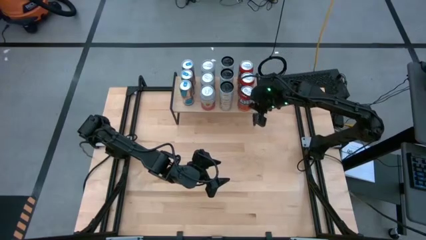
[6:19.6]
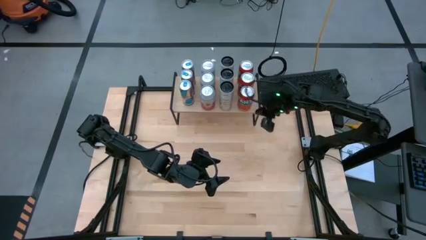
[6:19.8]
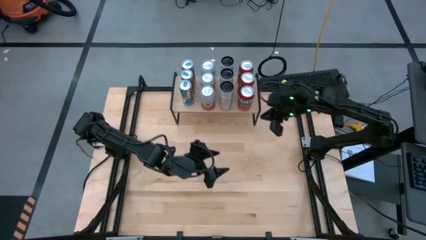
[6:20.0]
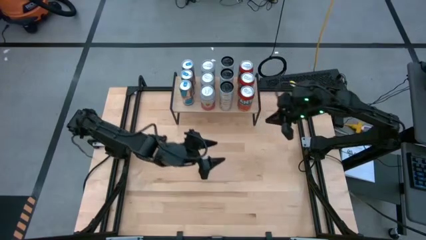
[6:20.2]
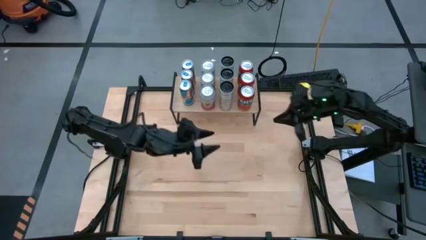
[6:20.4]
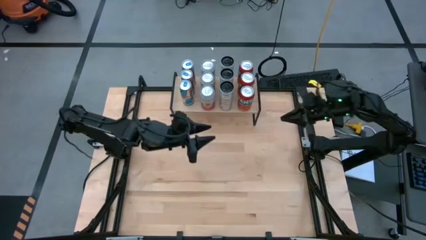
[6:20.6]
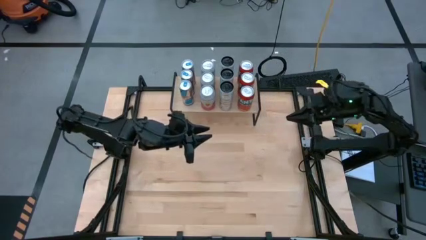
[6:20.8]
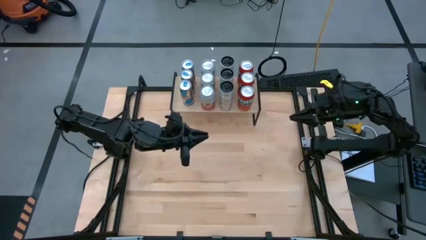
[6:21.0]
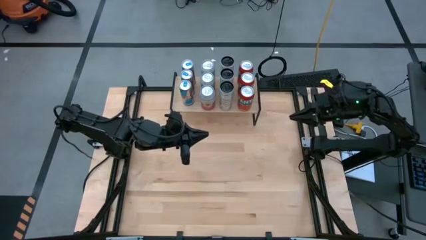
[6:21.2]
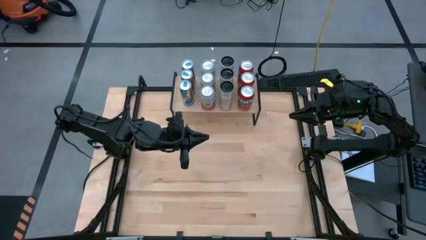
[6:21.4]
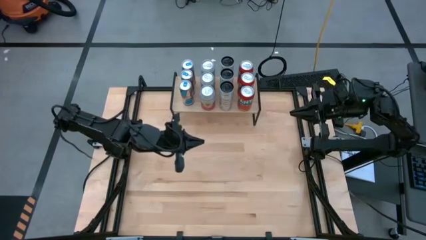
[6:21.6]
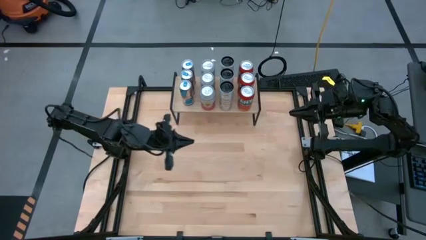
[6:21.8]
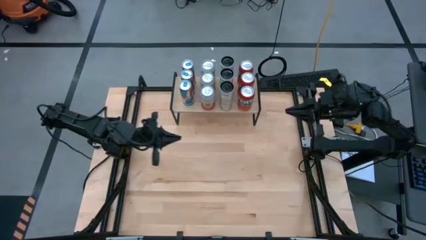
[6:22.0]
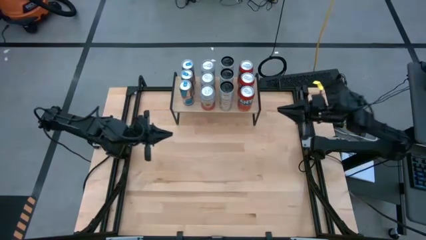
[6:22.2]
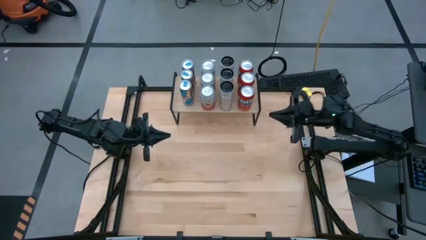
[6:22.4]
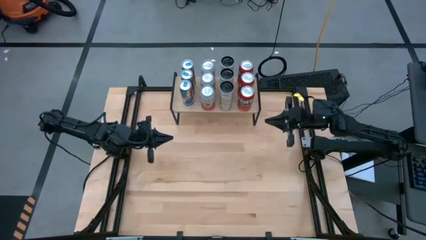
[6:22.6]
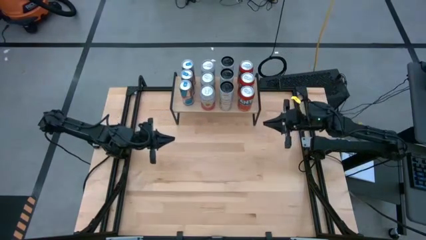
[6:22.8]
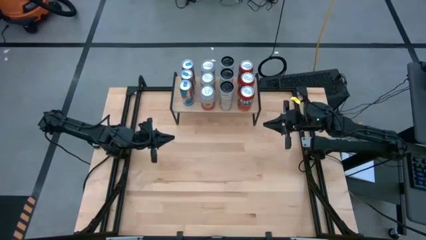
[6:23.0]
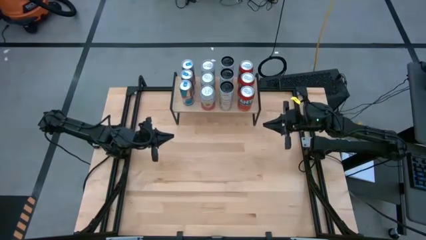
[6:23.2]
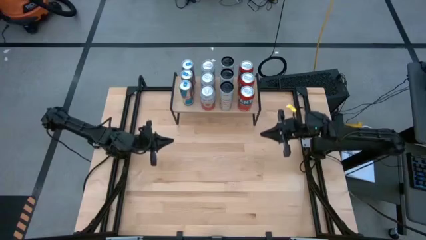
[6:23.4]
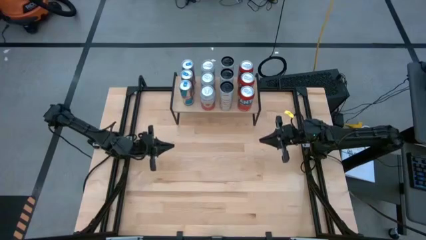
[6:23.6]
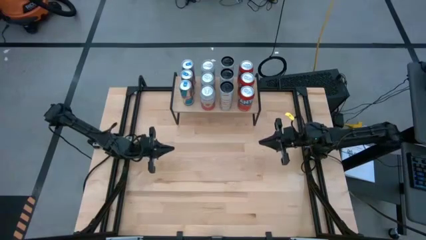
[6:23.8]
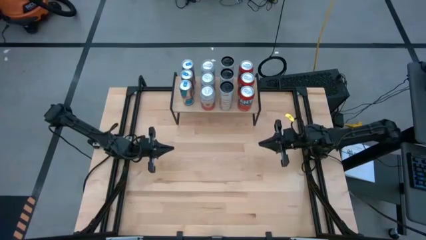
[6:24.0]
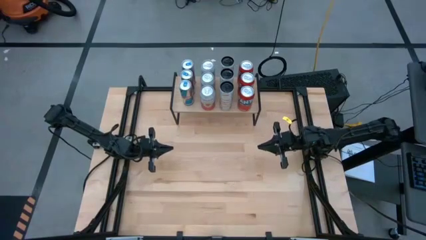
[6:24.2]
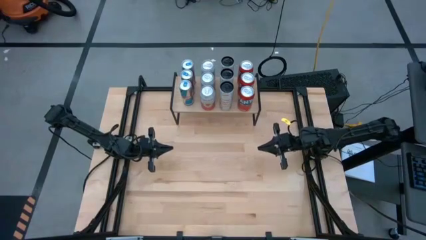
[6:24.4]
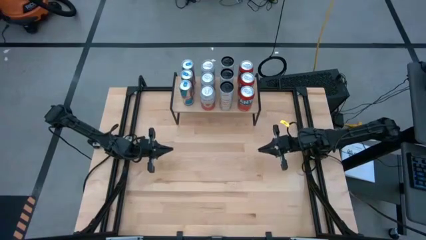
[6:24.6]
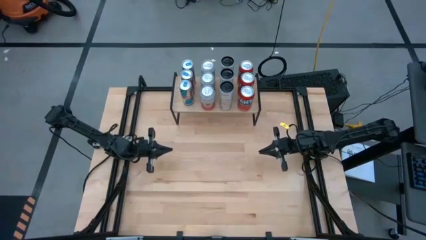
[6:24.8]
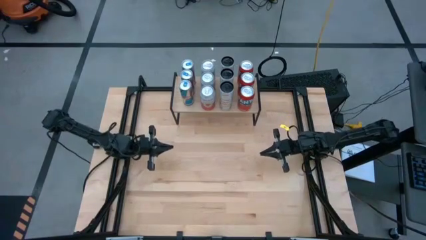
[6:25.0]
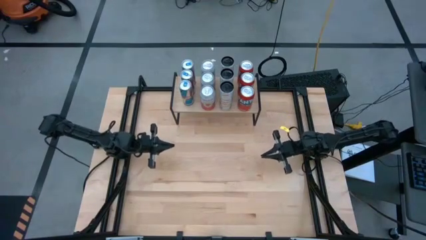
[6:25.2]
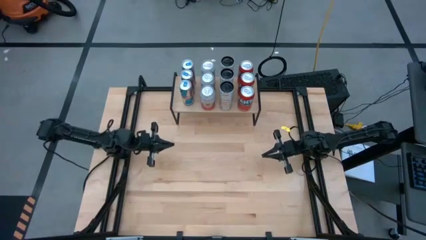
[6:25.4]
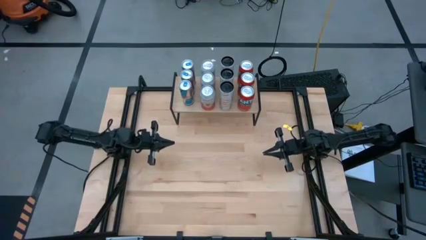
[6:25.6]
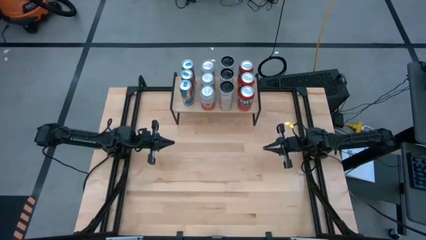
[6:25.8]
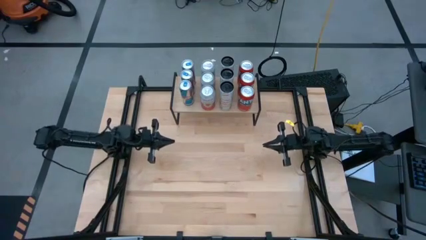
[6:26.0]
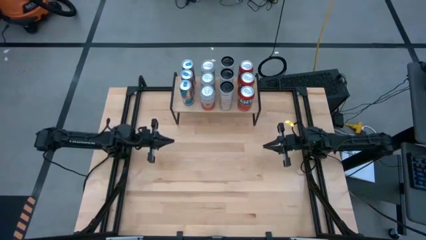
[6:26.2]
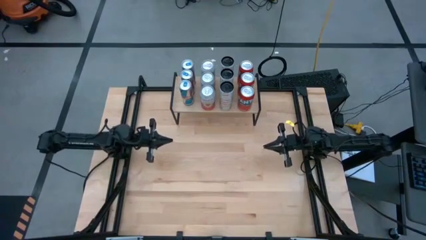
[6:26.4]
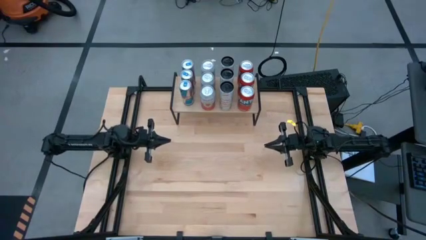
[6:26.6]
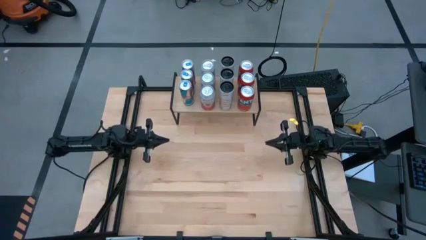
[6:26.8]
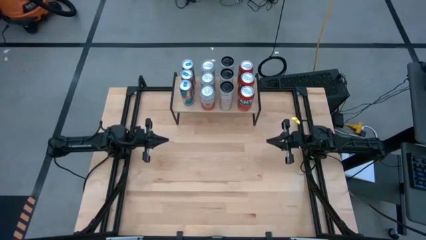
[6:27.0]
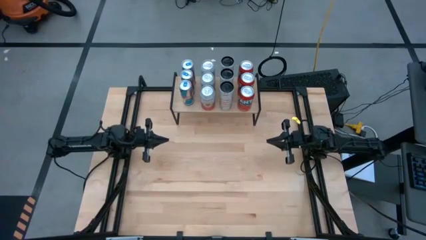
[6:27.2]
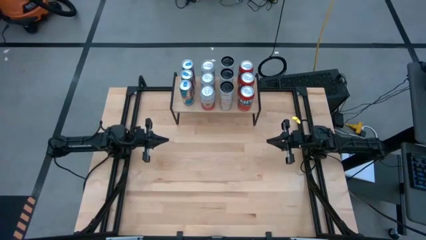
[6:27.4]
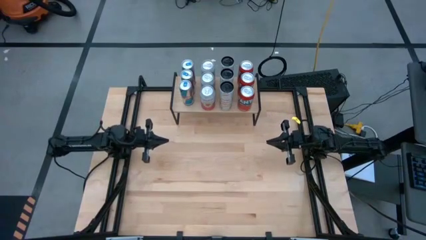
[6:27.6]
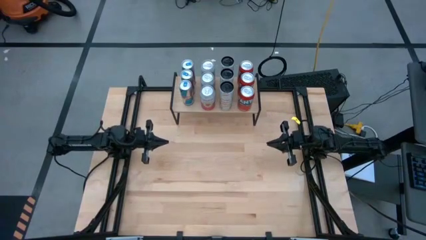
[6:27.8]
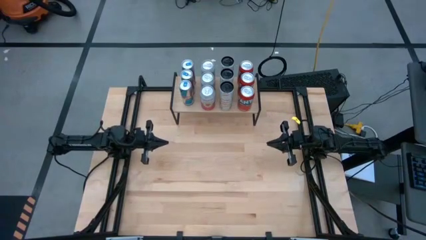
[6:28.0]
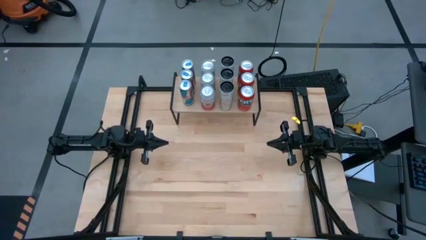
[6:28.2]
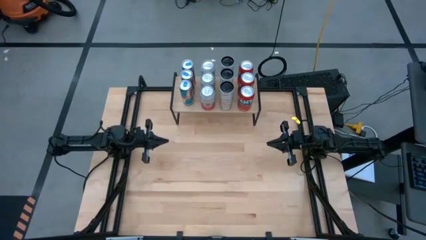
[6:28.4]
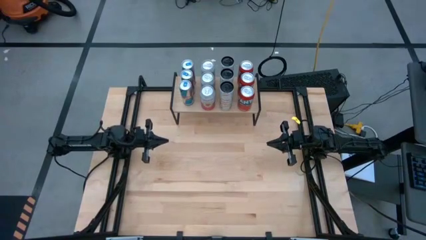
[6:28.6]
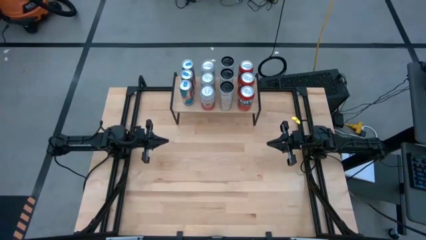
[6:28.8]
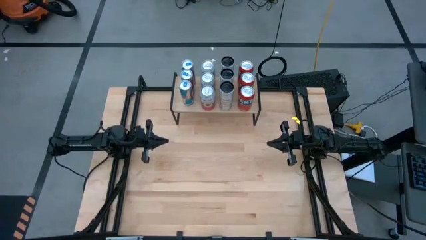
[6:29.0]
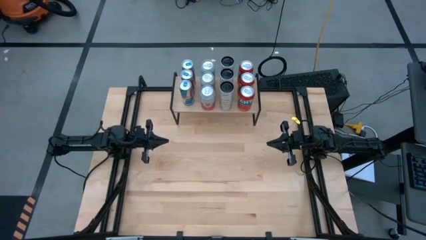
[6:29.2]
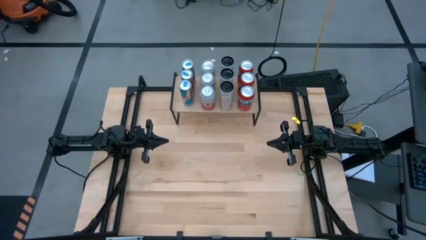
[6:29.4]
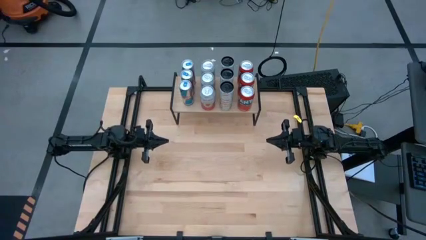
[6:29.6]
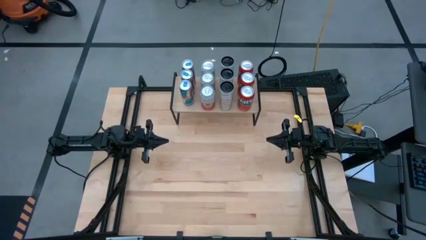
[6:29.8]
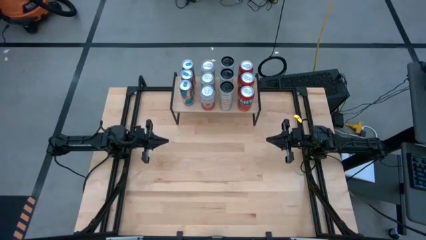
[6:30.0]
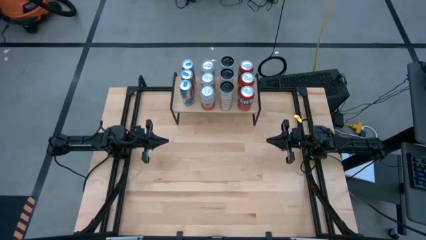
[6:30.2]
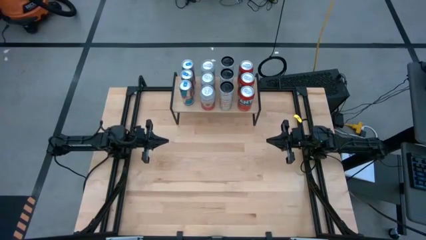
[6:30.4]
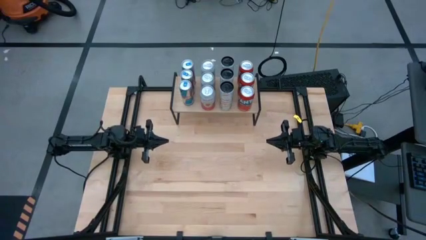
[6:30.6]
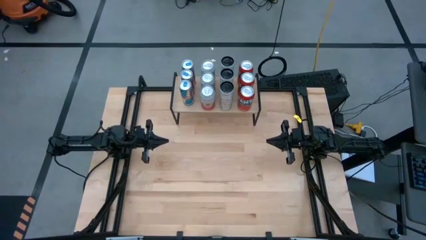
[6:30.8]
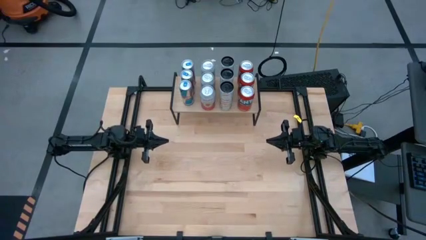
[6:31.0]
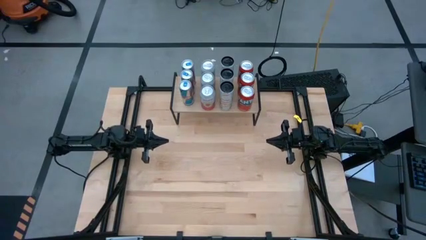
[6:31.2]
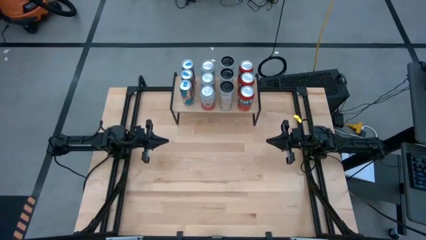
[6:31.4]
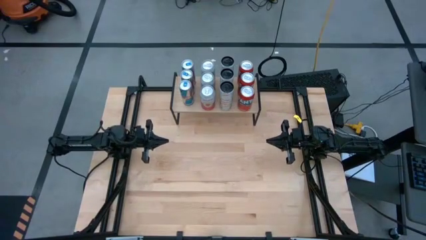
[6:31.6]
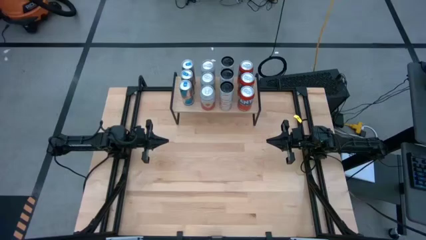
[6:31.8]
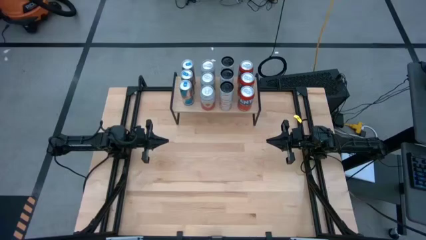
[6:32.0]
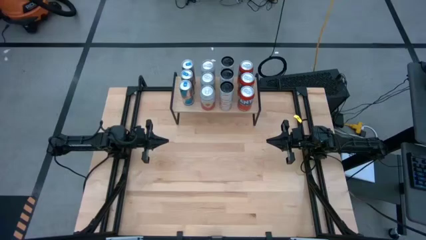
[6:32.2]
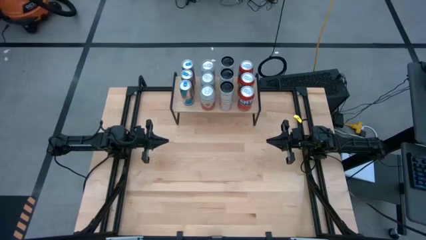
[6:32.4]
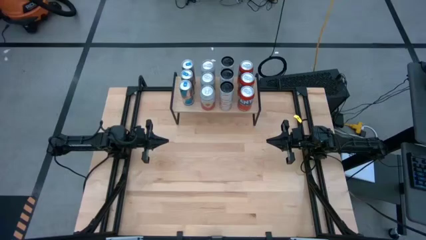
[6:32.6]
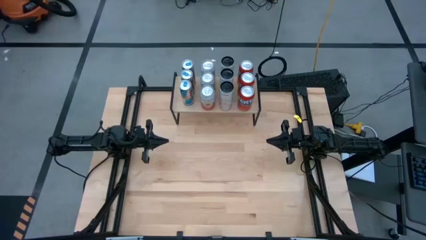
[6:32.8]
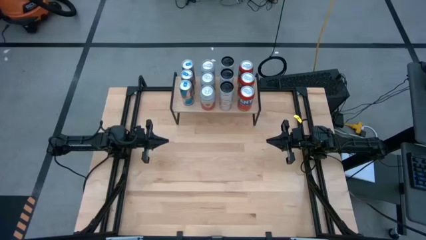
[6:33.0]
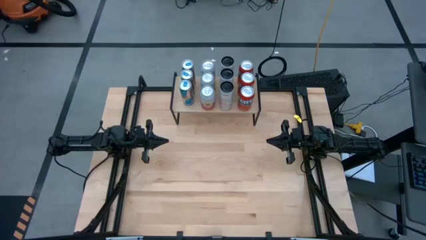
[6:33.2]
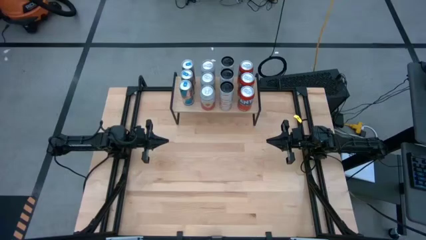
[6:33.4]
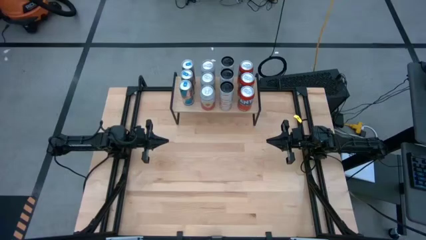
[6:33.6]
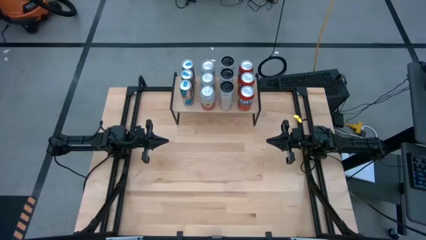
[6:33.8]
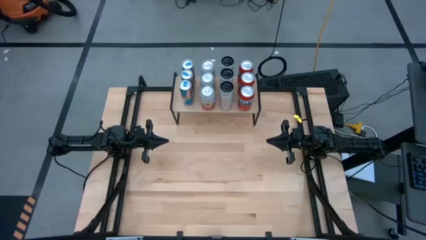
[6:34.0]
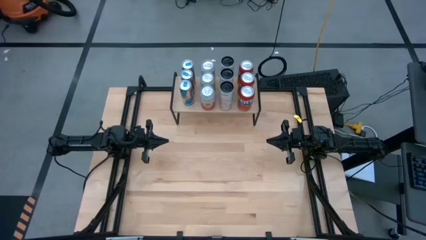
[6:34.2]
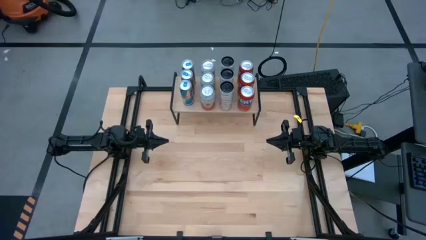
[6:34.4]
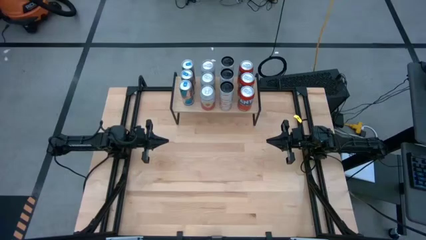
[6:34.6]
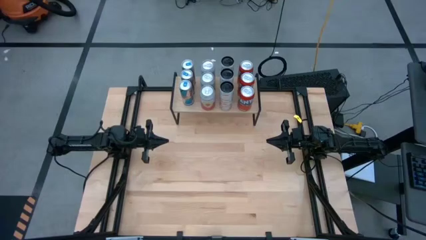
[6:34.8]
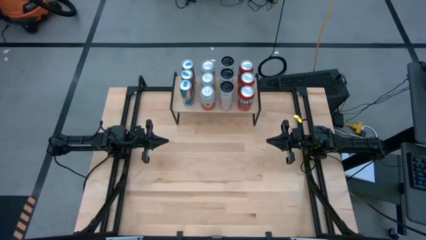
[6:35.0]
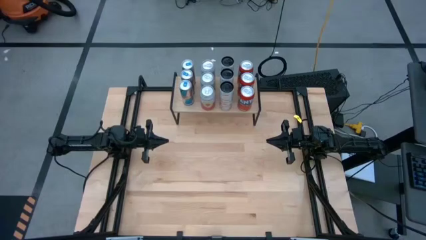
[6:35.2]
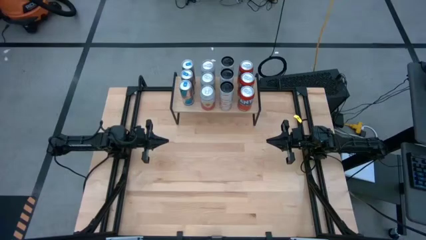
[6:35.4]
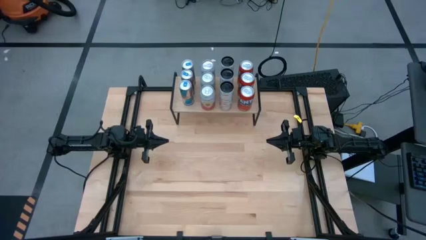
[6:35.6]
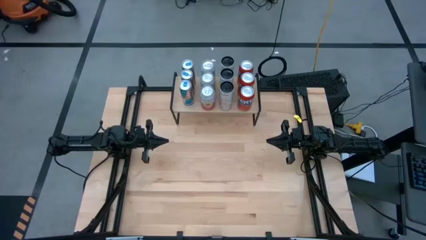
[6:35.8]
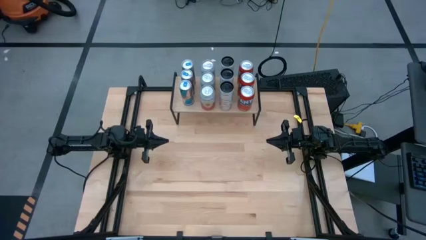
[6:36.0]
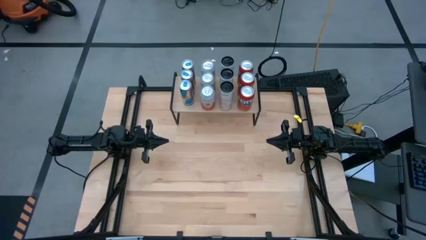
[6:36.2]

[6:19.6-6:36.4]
Task: Place canned beverage on shelf
Return to Home Position
